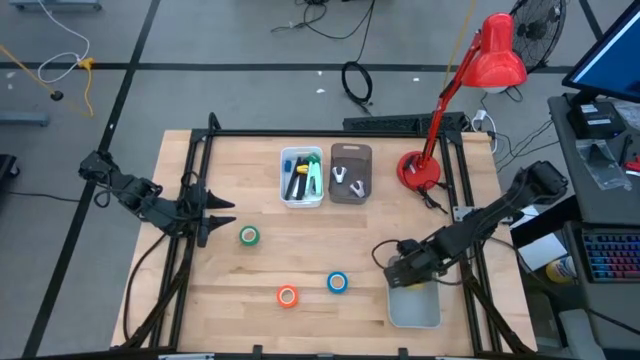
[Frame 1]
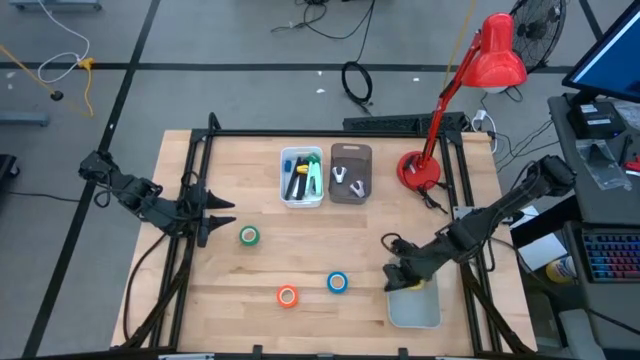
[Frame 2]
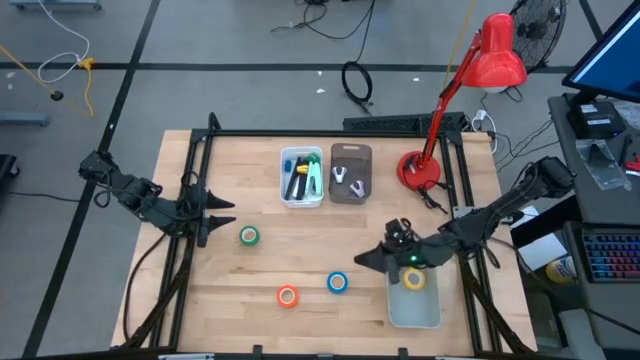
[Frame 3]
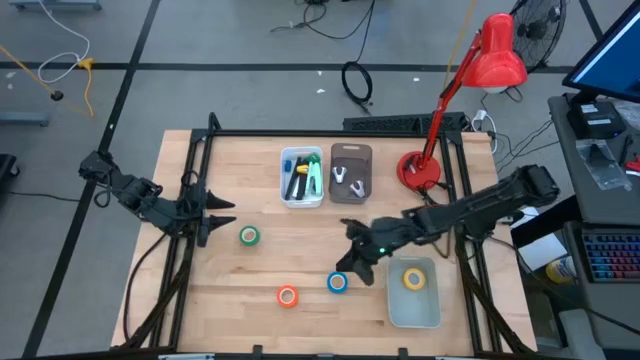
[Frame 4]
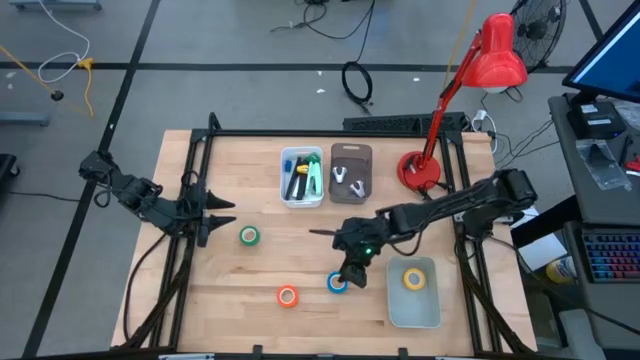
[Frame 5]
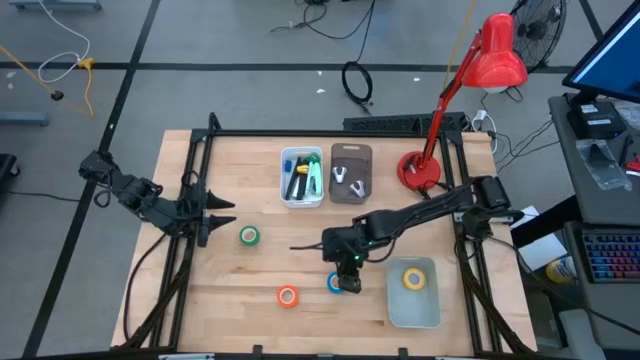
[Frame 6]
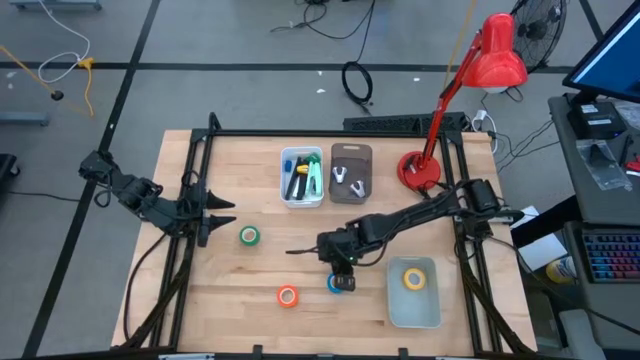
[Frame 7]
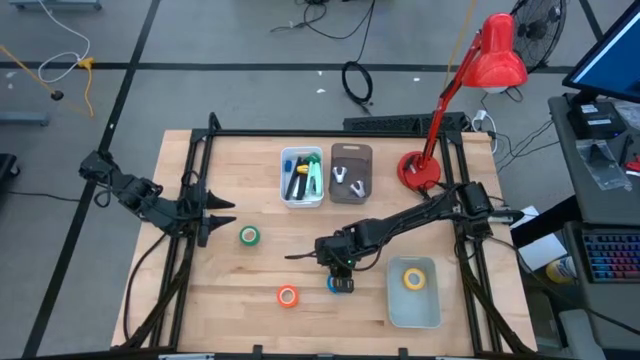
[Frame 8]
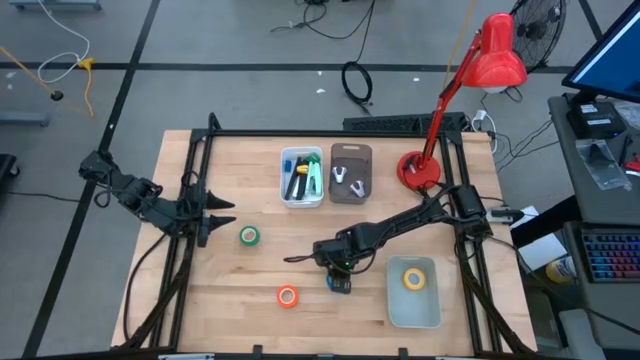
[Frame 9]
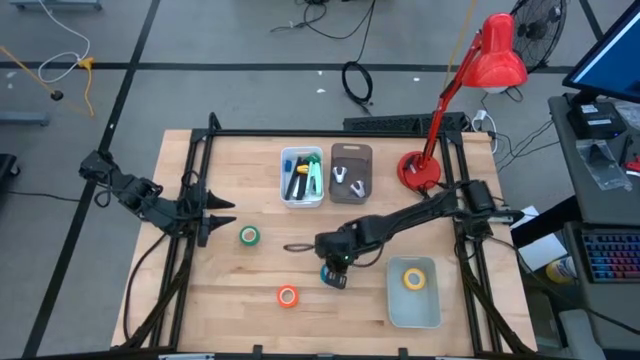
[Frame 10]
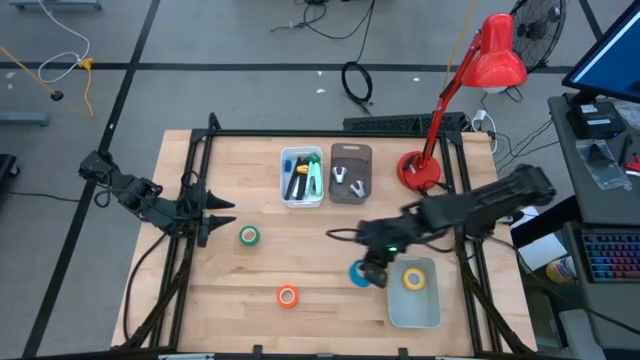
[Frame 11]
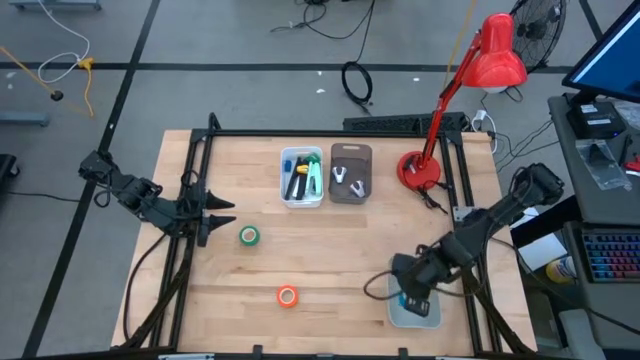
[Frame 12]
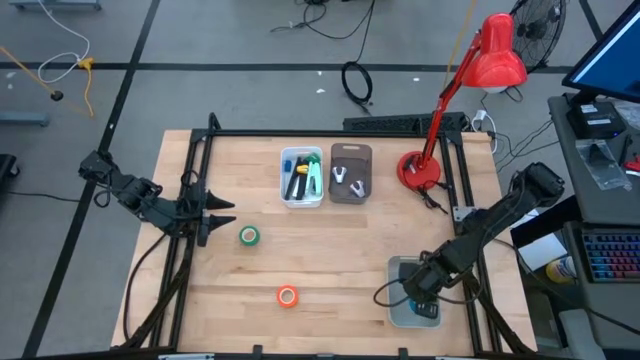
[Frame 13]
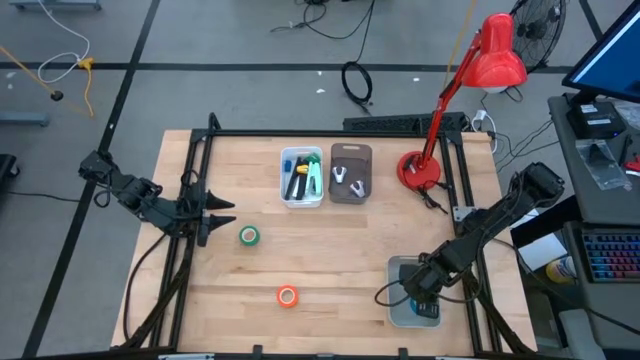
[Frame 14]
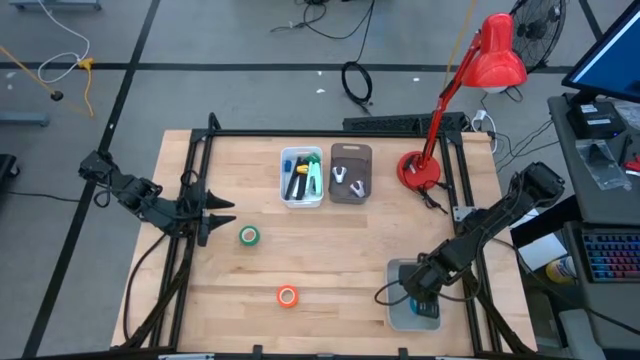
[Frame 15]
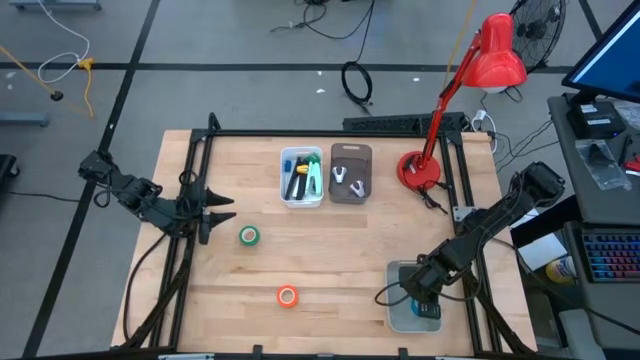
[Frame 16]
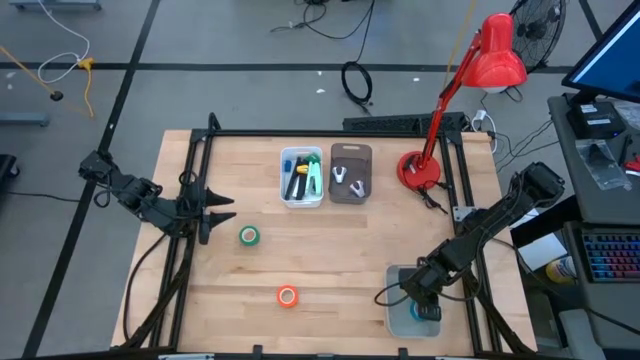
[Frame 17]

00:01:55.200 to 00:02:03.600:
Task: Pick and place Stapler, Stapler remover, tape
Put the blue tape into the gray bin

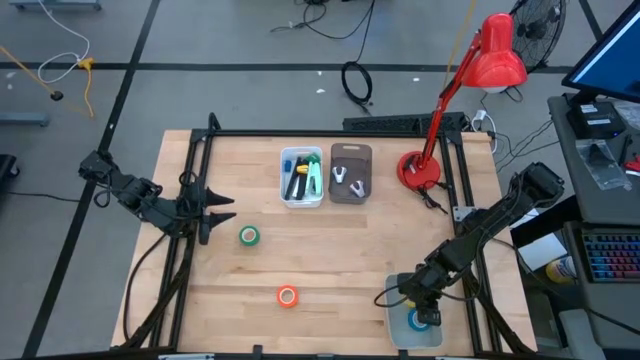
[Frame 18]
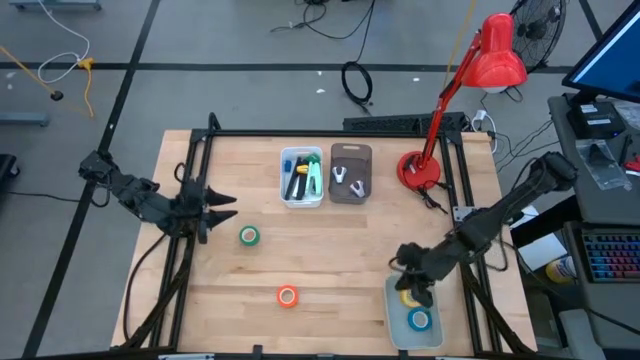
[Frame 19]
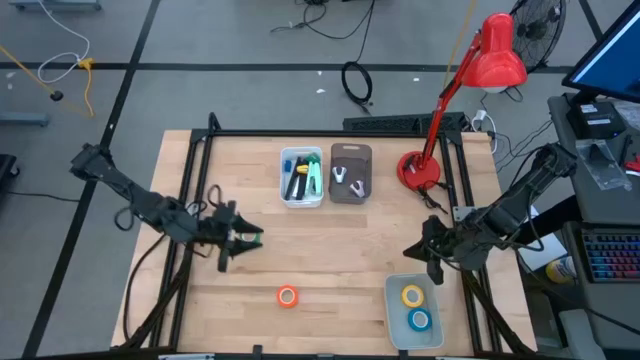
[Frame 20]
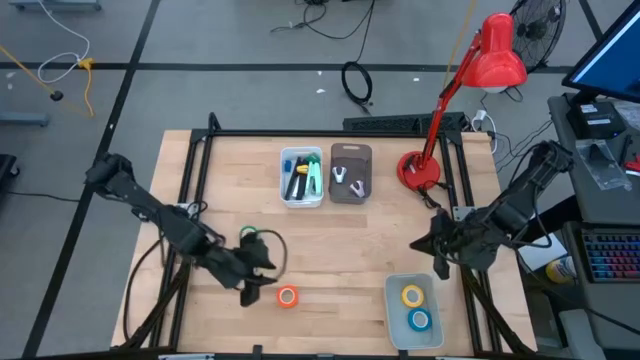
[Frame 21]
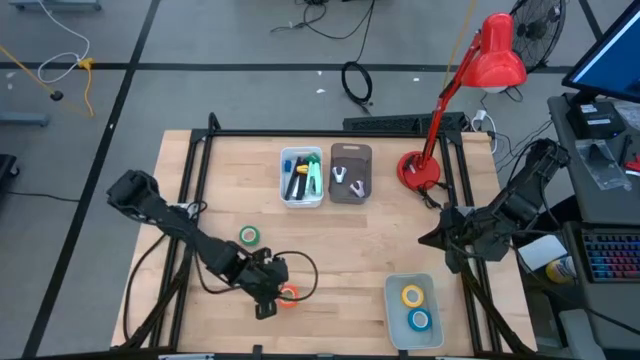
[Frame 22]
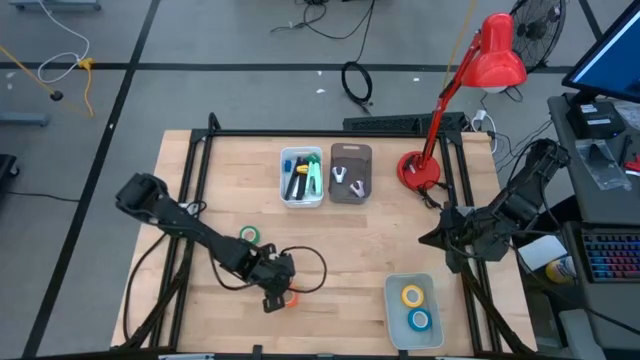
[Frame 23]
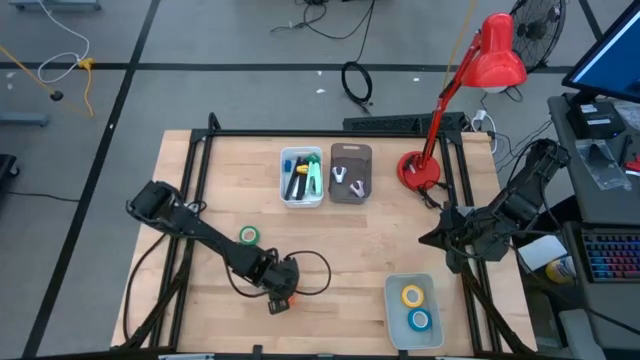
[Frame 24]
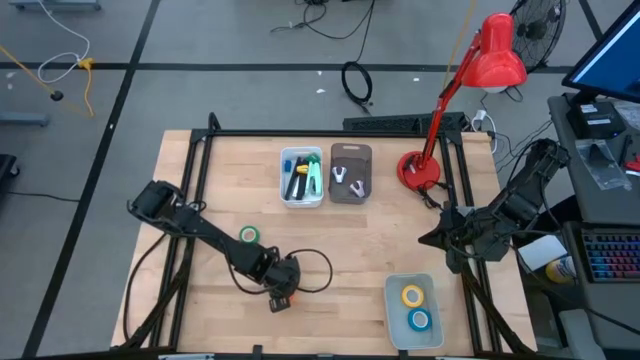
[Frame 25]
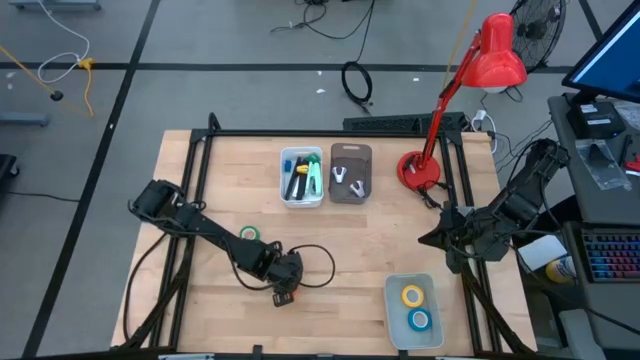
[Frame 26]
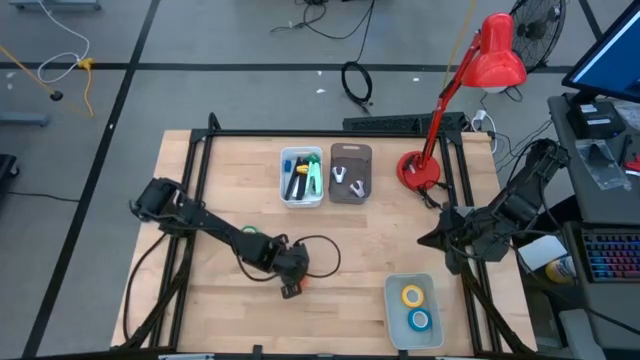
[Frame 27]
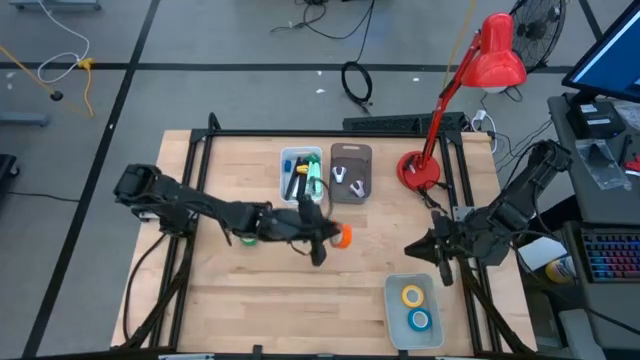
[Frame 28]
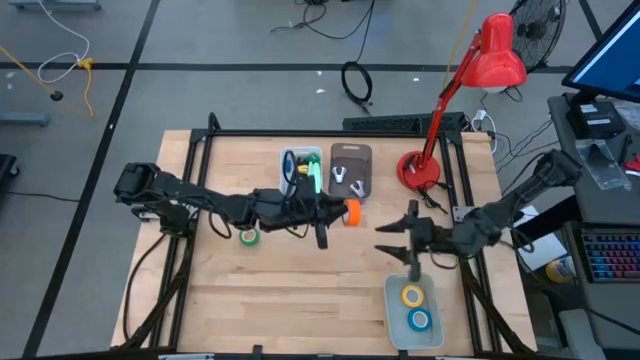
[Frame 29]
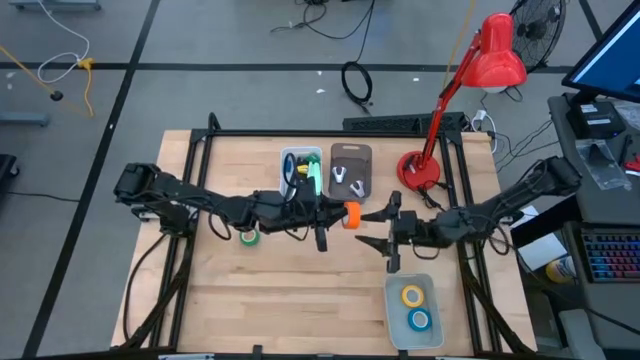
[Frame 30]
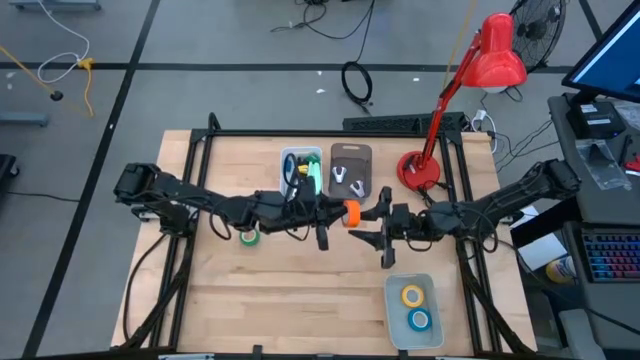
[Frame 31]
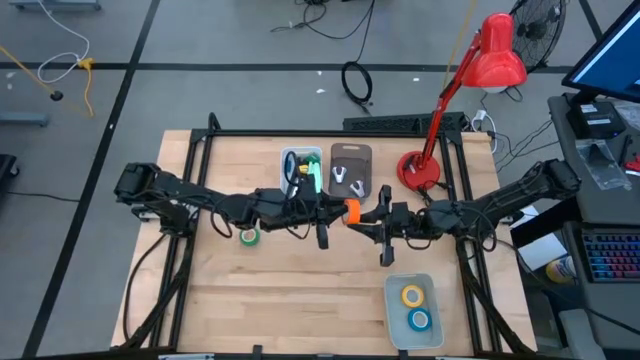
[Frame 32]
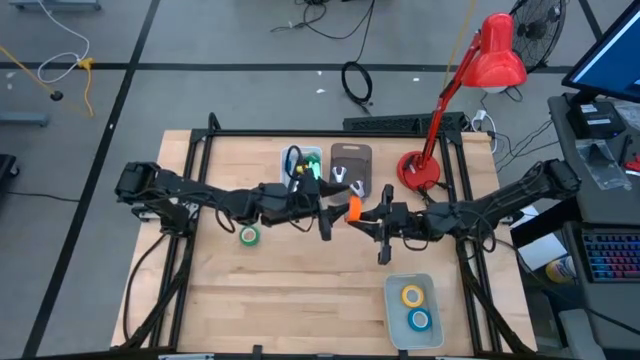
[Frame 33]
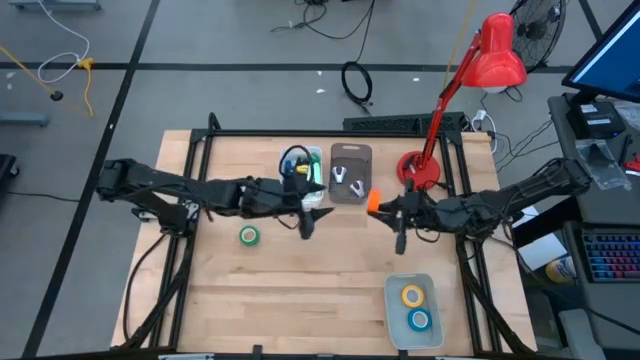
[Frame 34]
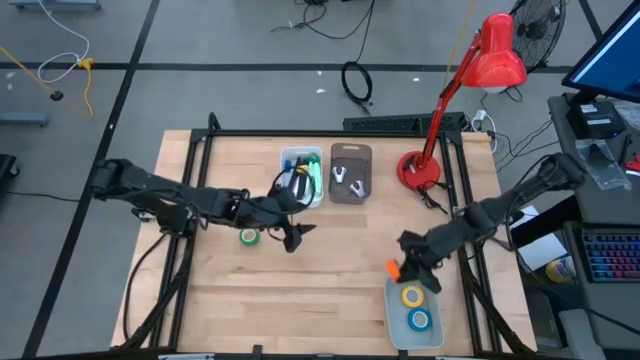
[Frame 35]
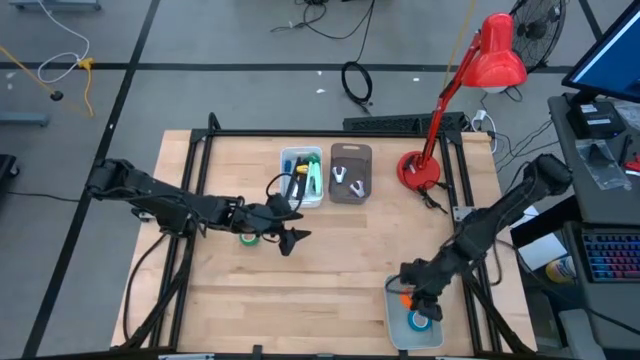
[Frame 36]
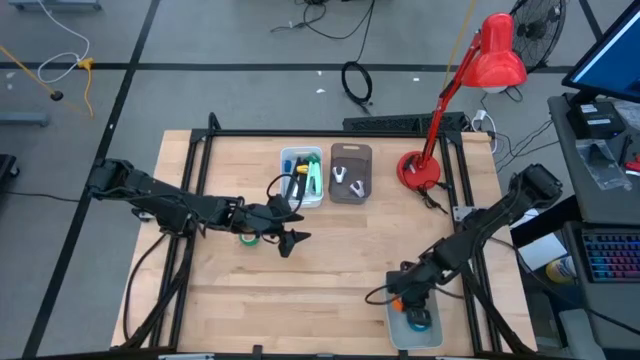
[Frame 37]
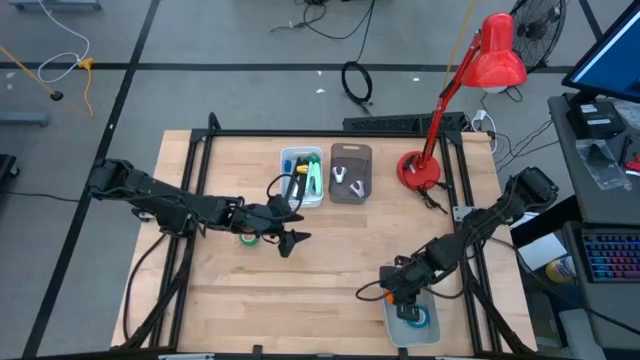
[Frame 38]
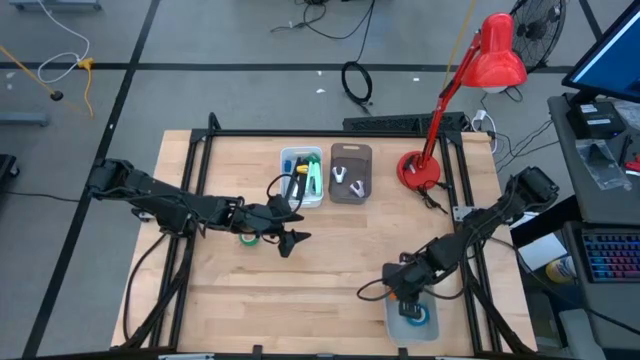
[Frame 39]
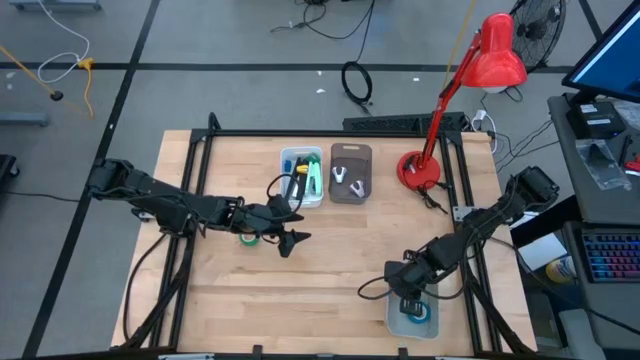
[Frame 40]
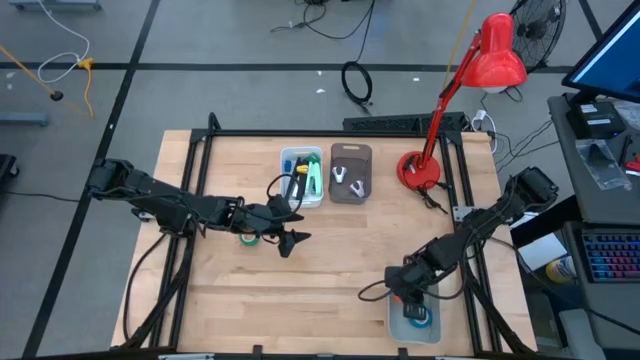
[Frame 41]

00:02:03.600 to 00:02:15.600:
Put the orange tape into the gray bin
